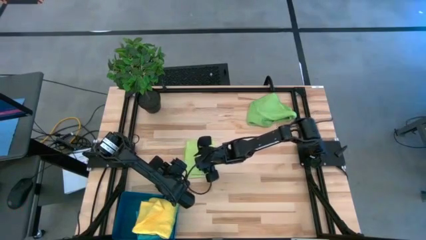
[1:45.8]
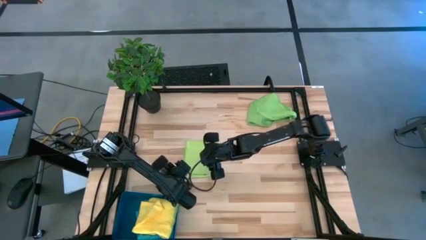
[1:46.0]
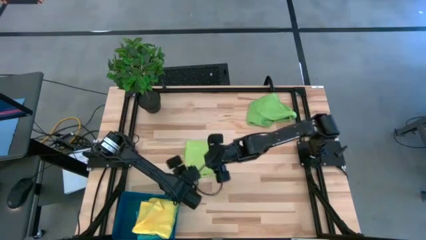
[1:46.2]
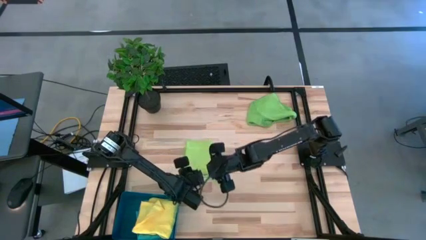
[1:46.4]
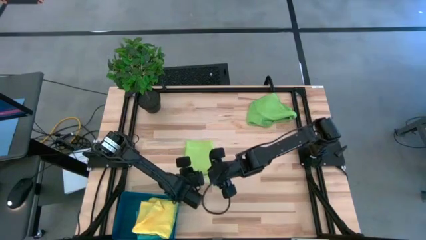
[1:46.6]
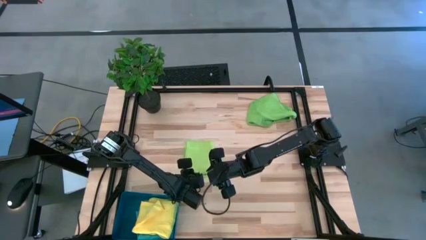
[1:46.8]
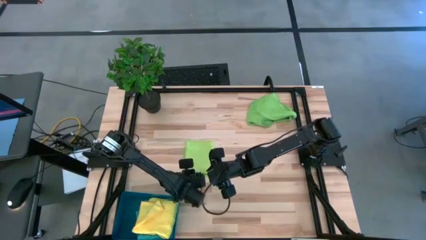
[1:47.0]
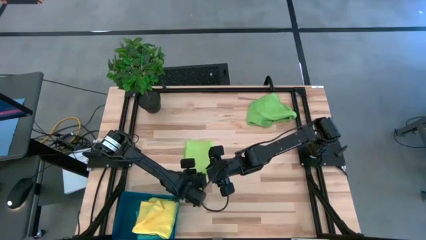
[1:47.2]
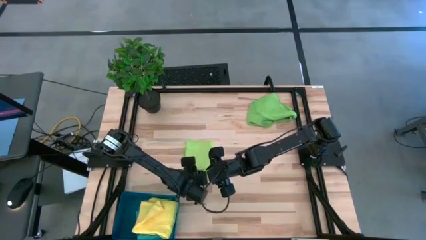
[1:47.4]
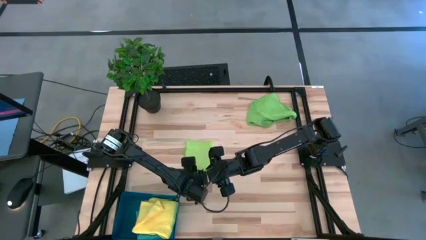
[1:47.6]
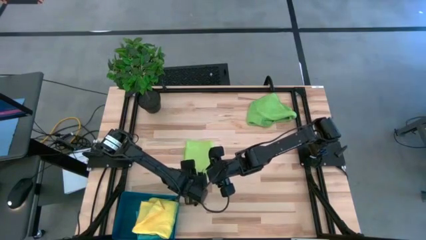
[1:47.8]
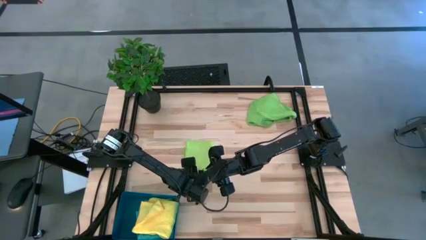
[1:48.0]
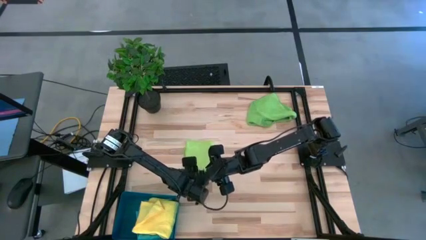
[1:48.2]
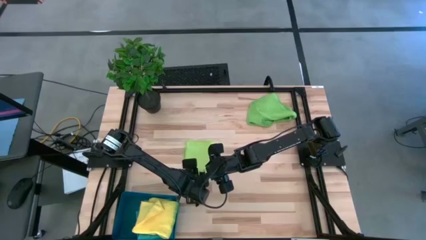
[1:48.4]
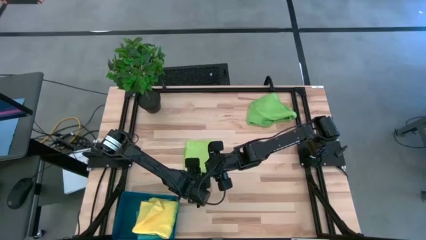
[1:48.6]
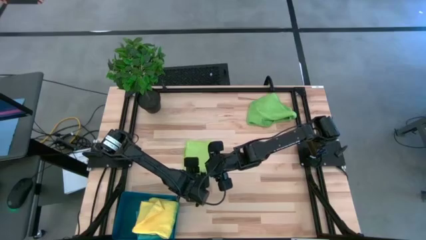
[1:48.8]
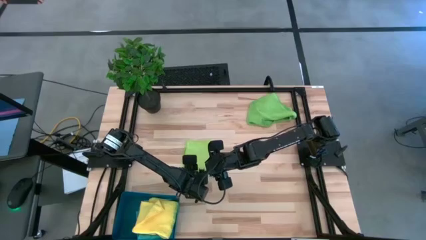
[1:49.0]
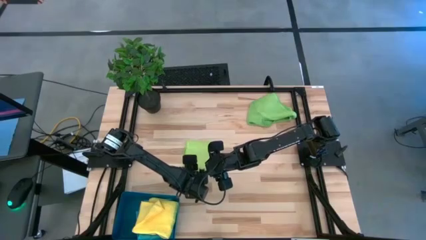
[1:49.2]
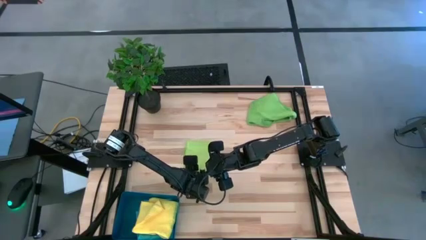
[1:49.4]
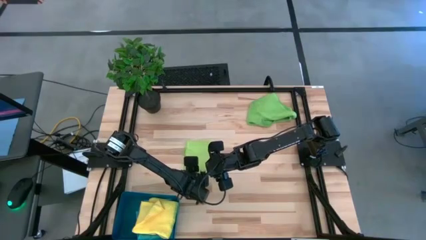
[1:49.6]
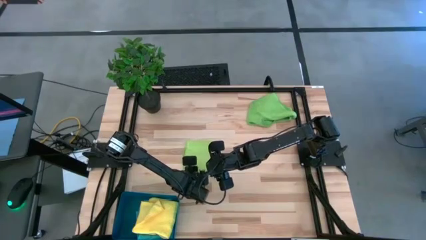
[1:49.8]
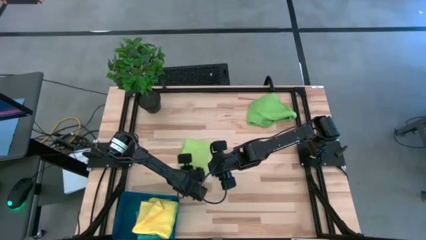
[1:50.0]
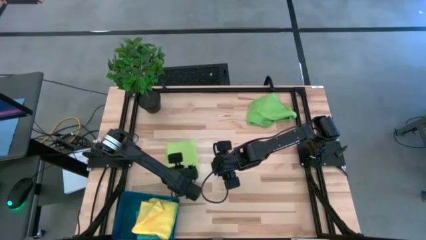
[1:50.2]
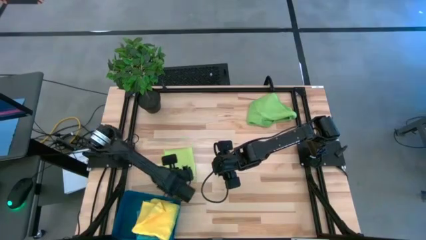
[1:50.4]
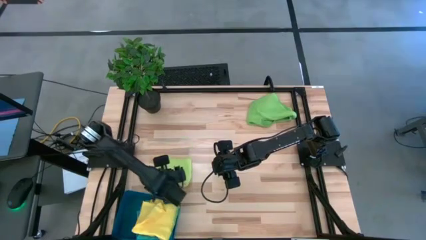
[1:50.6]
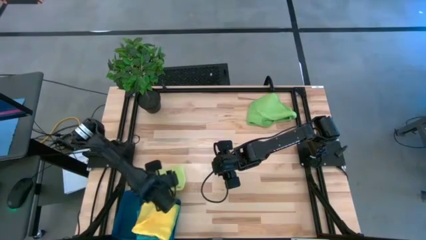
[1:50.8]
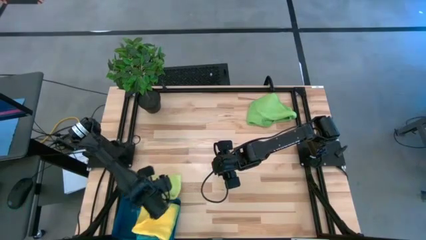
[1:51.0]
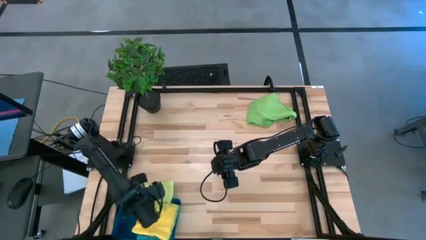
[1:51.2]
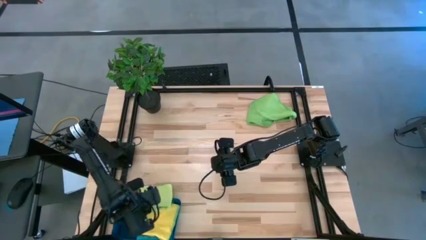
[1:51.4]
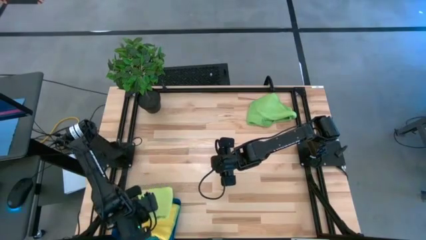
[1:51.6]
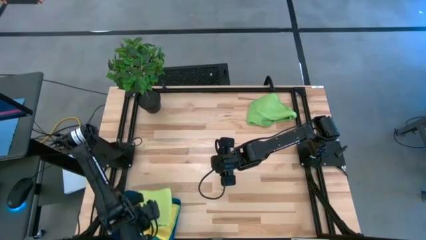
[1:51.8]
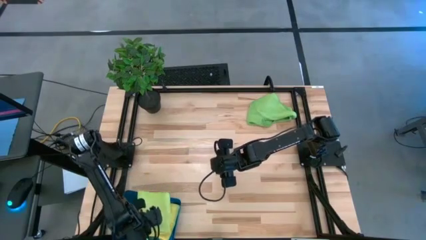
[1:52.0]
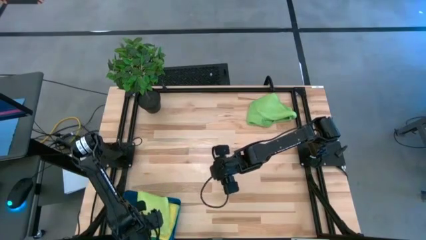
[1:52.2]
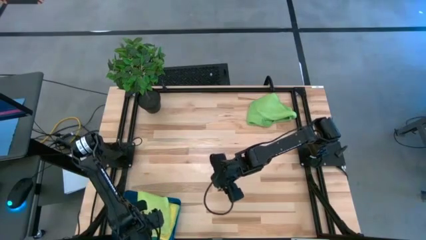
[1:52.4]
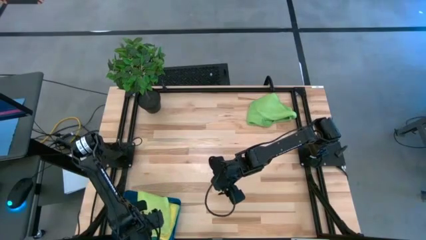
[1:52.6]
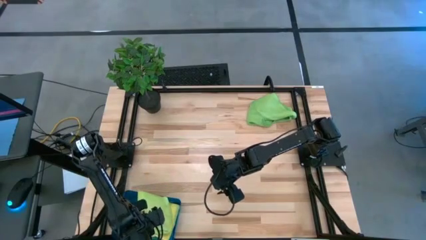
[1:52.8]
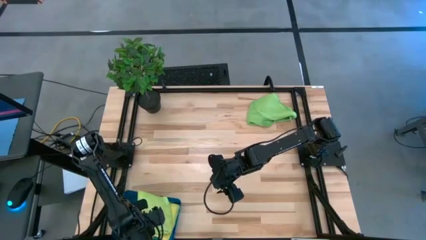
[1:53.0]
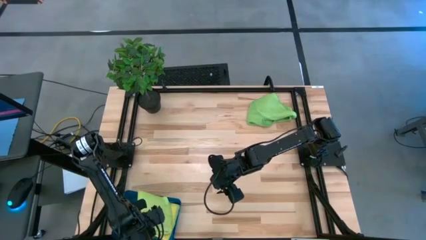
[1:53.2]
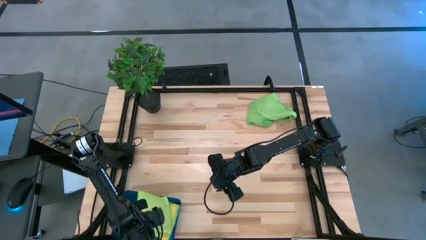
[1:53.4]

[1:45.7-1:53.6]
Task: Fold microfiber towels
Put the light green microfiber towel into the bin

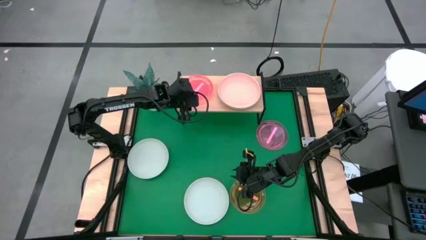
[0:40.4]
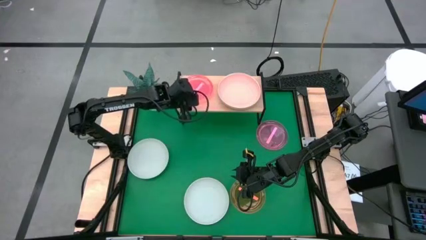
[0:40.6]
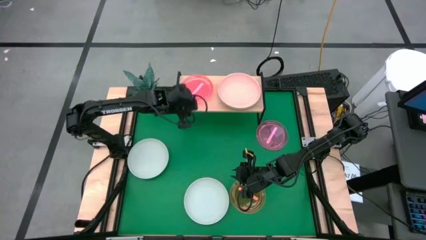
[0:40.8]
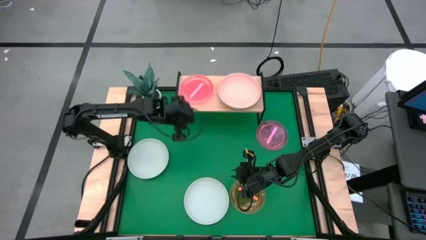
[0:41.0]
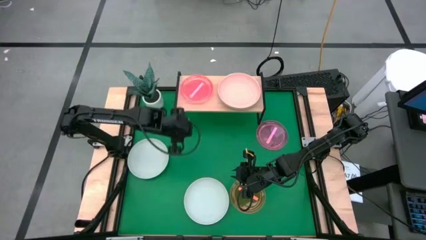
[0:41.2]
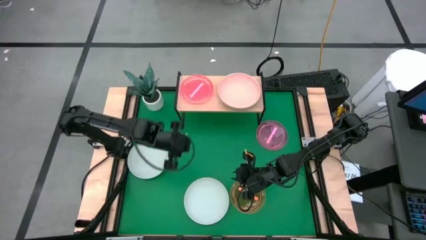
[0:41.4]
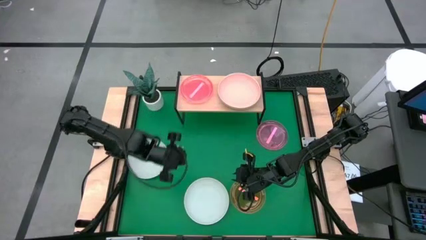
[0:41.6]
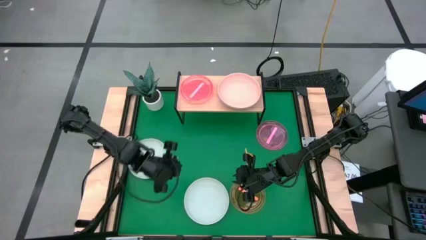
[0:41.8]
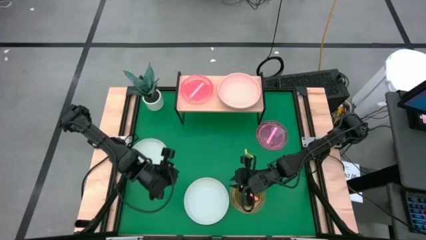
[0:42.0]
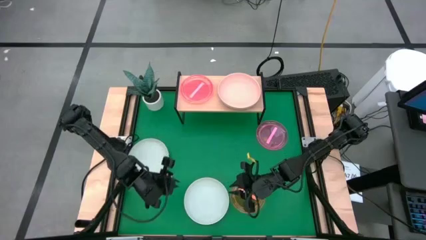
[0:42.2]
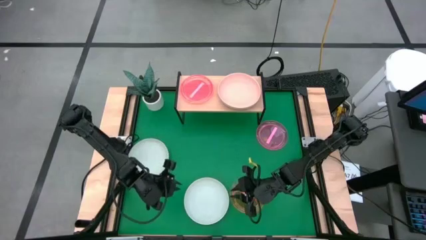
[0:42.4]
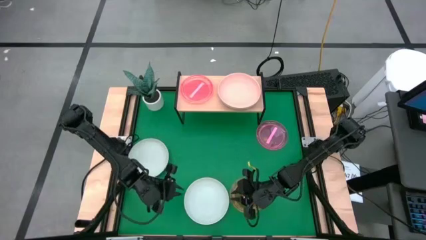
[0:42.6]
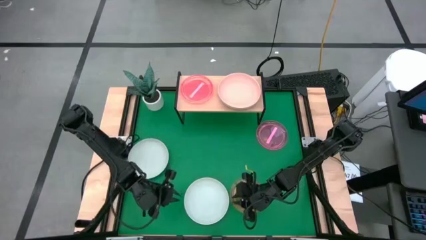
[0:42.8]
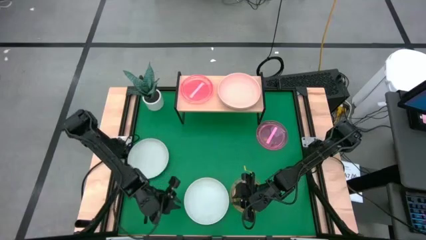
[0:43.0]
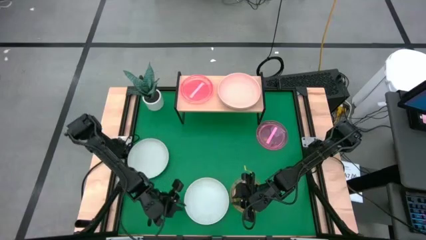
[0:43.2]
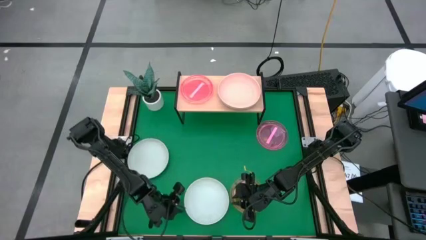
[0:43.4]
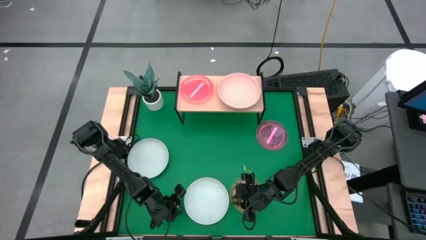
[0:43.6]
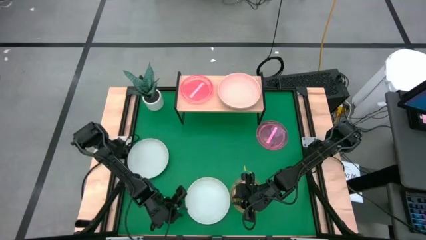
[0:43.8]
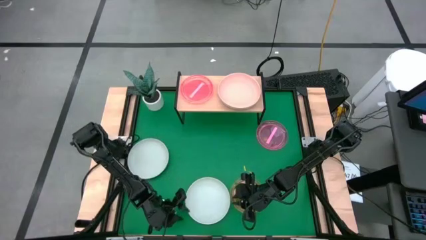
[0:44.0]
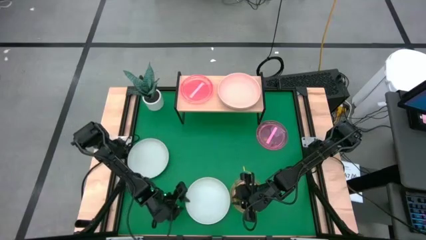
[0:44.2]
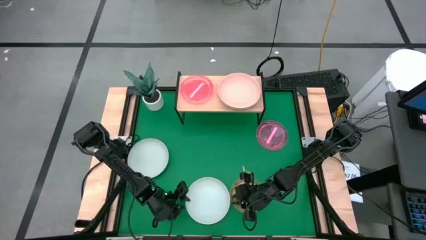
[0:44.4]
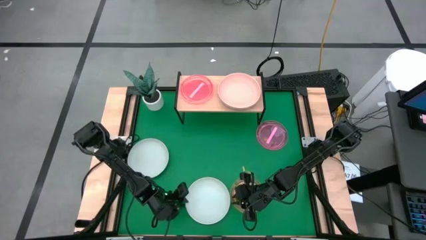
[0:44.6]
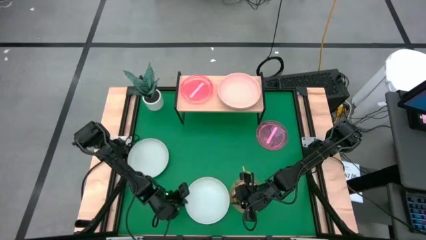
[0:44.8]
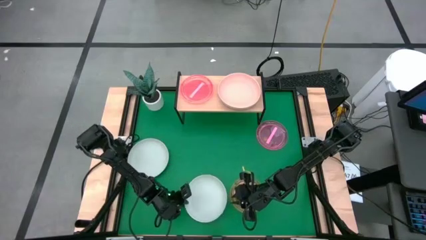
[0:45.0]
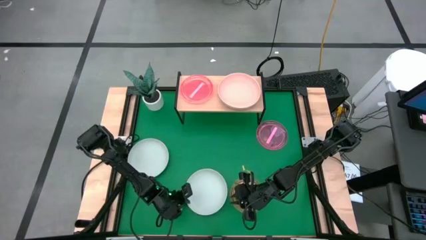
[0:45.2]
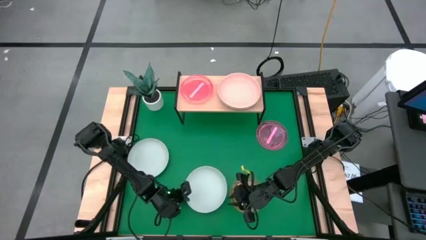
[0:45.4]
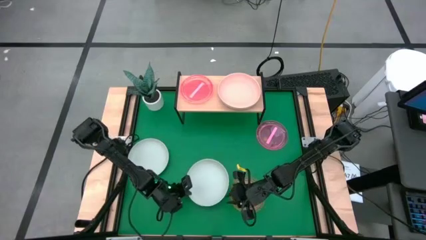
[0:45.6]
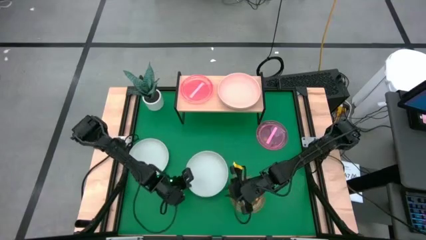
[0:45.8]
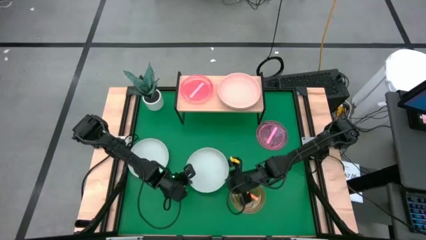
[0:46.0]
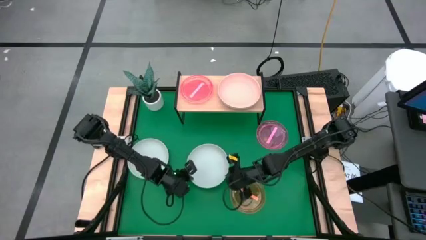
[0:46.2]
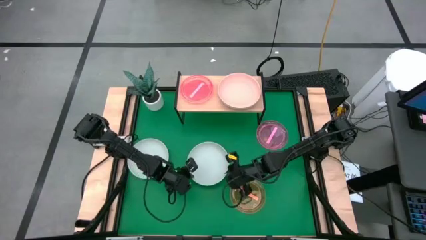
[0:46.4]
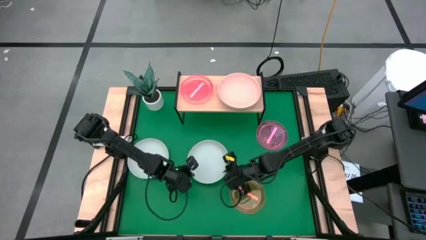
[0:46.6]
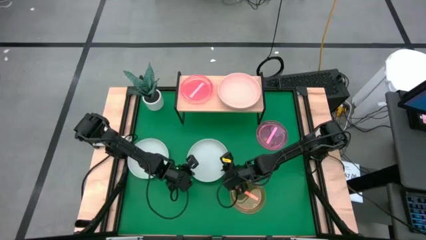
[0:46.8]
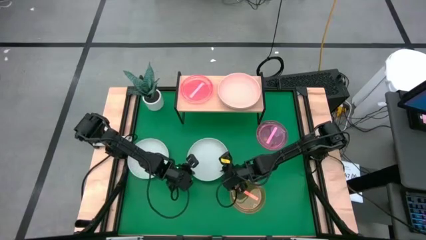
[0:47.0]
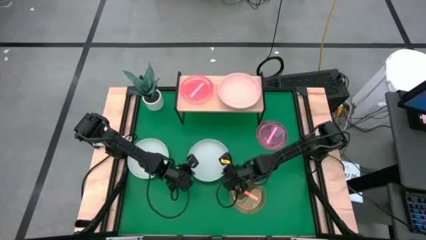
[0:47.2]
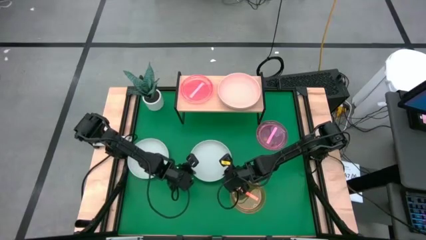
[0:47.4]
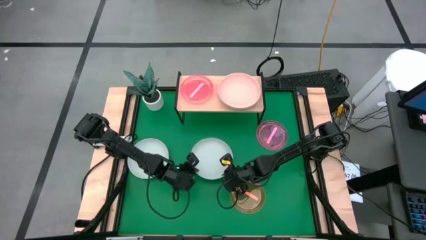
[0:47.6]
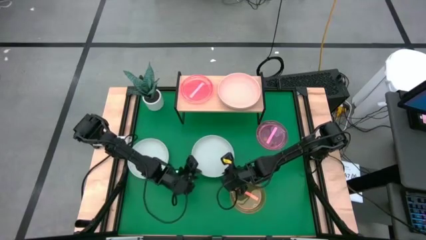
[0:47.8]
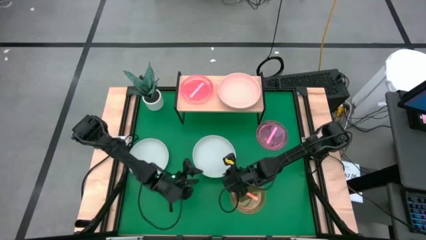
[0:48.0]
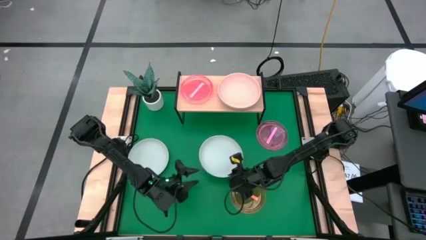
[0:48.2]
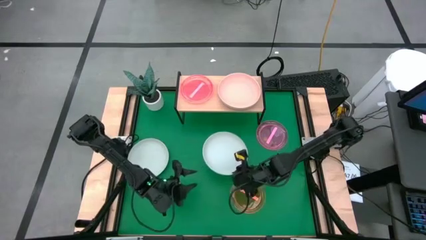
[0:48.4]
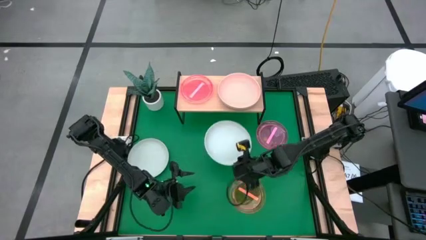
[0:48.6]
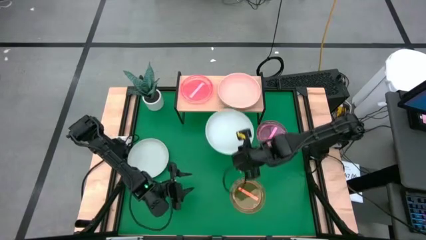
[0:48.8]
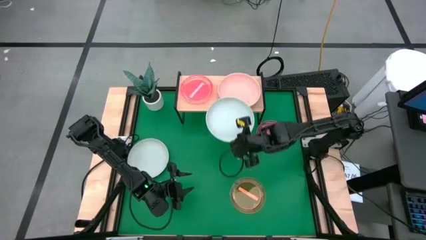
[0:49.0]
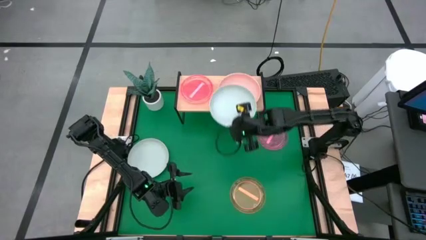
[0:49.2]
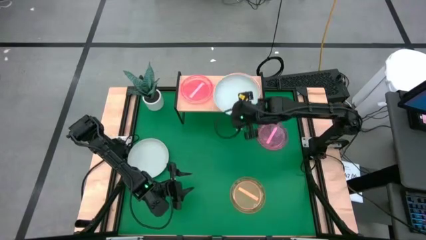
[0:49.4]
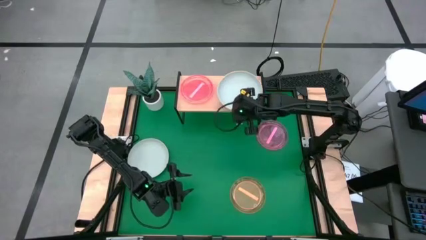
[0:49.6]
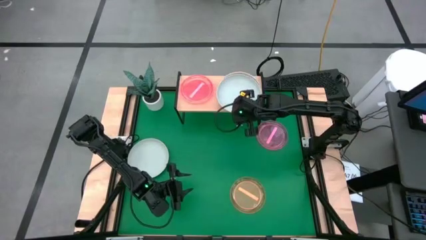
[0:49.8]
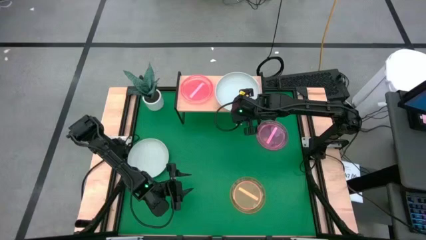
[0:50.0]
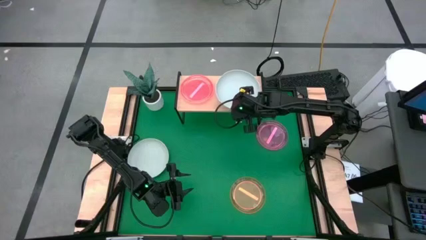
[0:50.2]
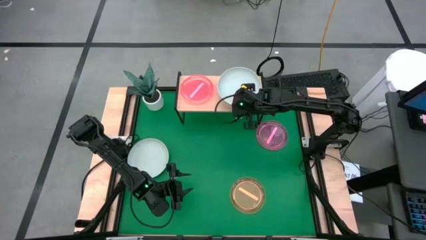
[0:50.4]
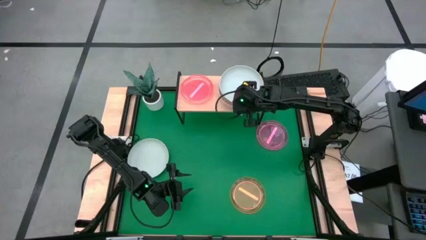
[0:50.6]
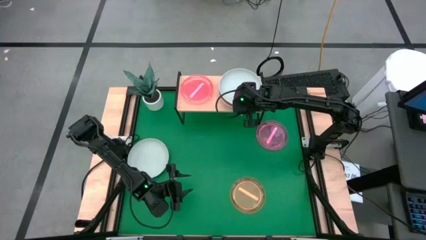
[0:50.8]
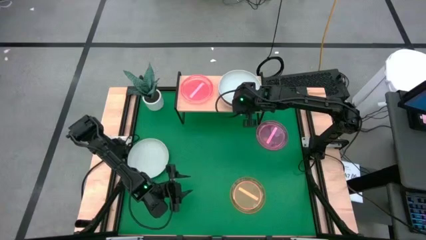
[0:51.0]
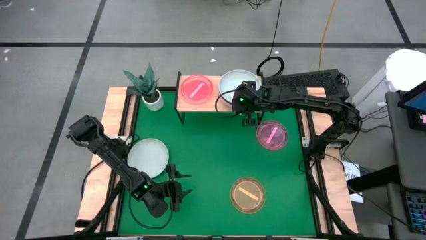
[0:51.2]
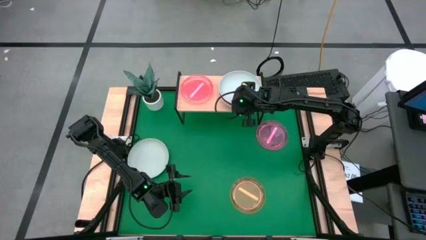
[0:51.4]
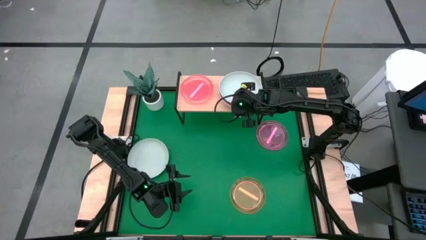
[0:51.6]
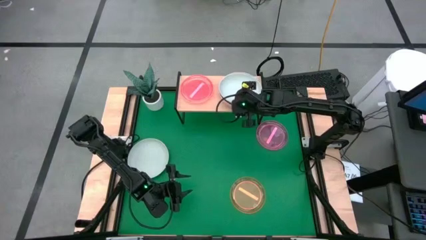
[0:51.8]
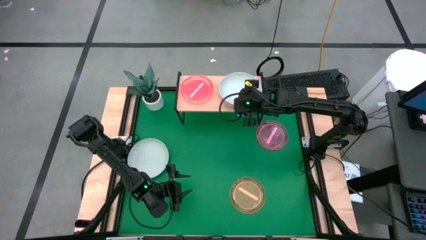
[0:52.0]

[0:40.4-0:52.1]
Task: Place and stack plates onto a shelf
Stack the right gray plate on top of the pink plate on the shelf
